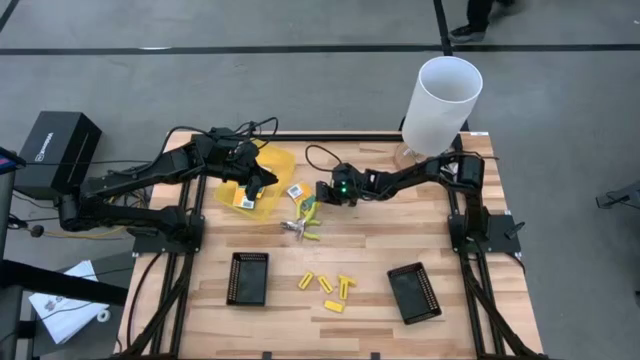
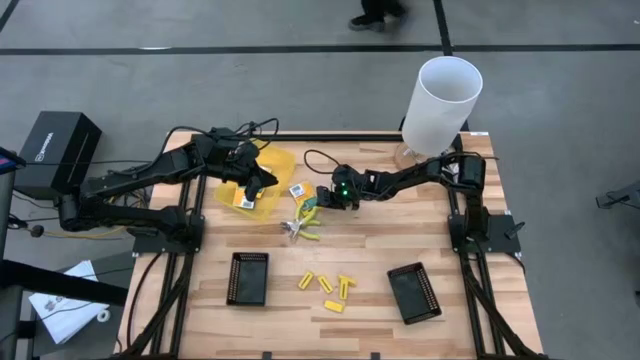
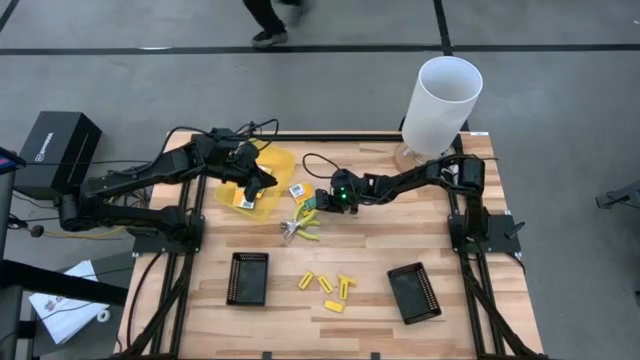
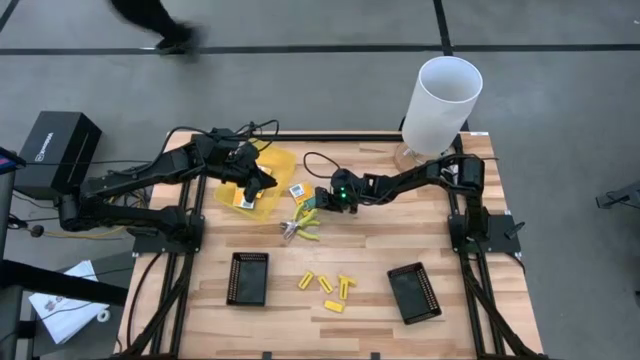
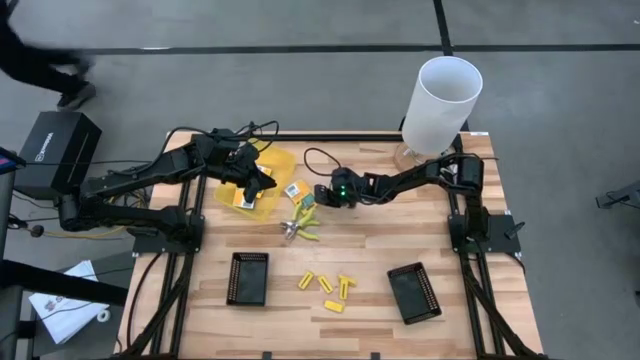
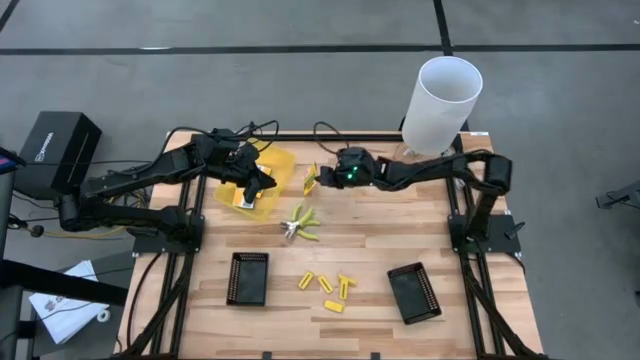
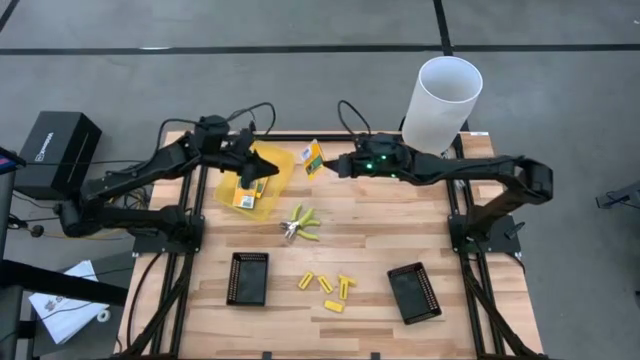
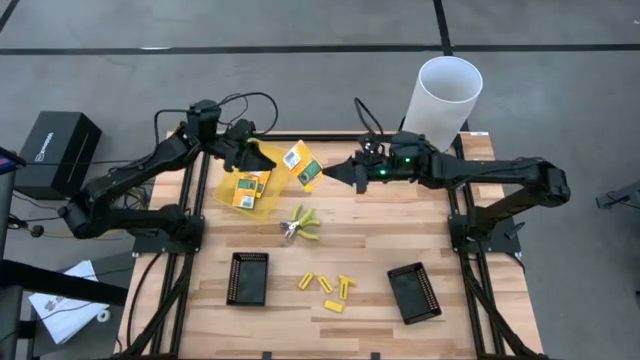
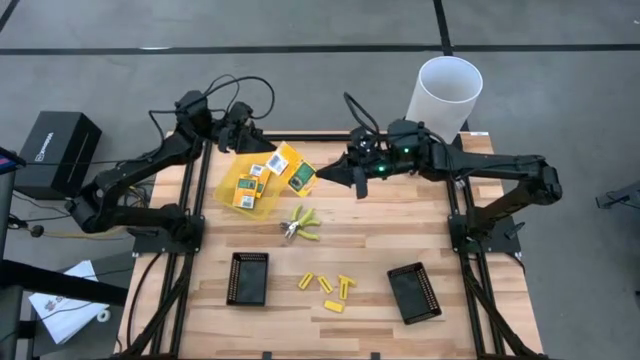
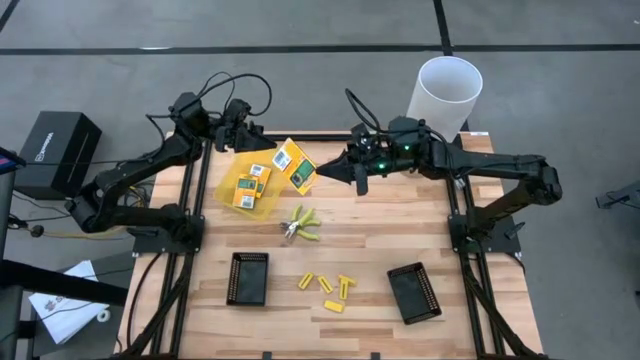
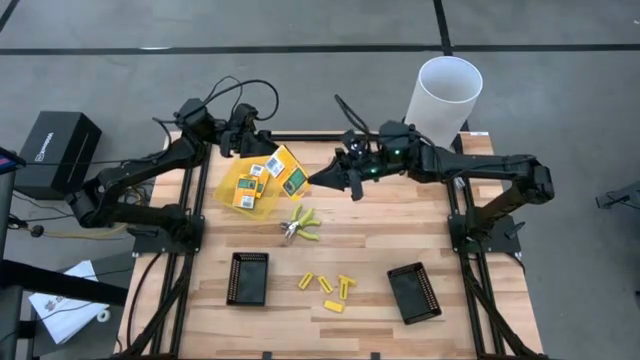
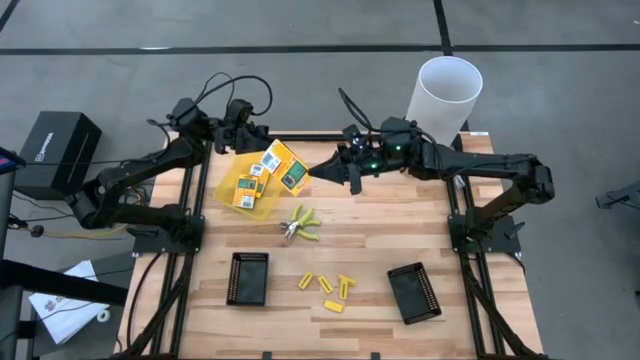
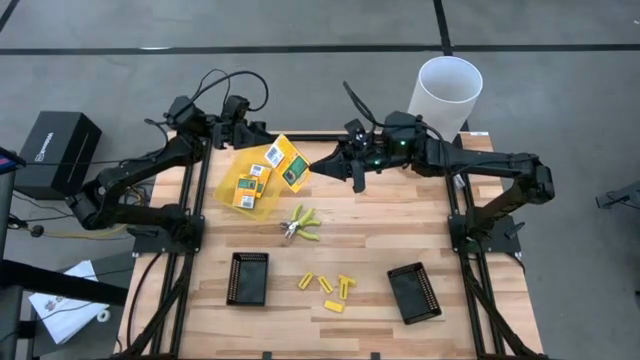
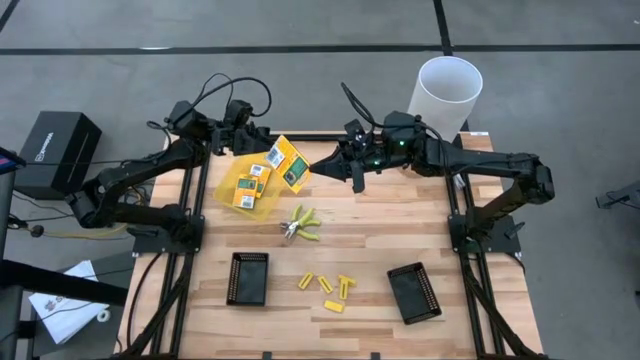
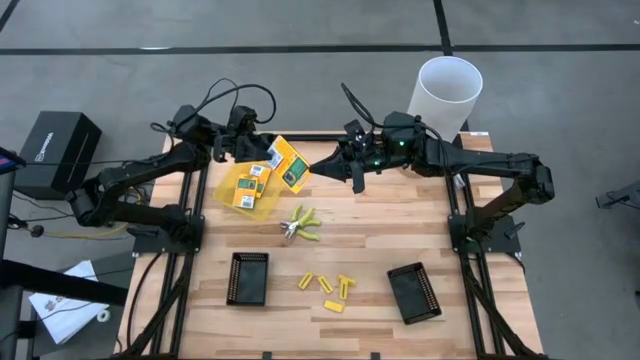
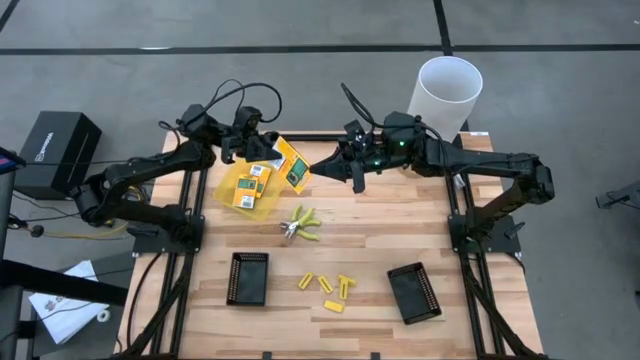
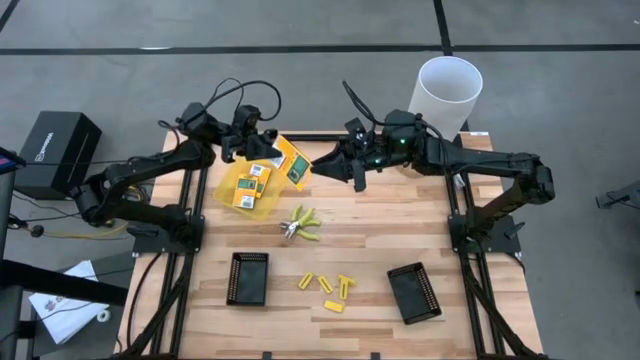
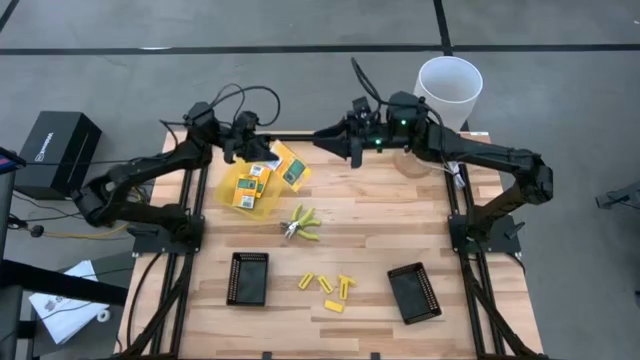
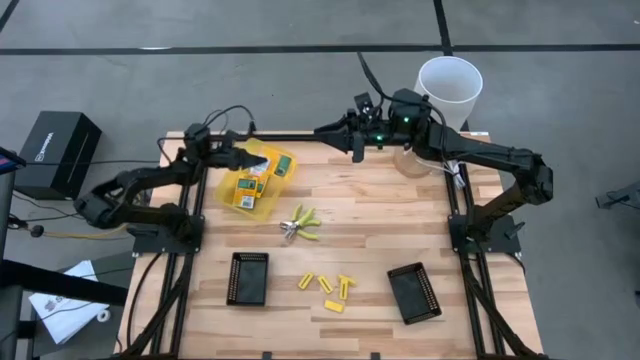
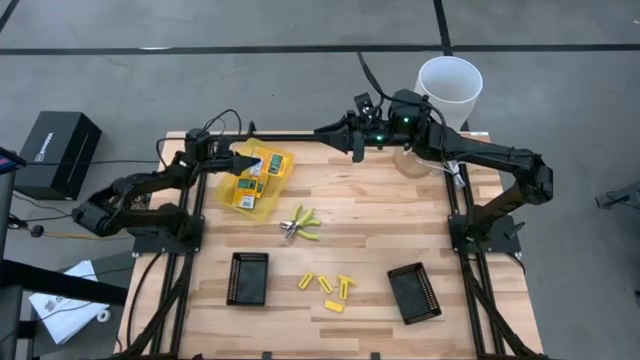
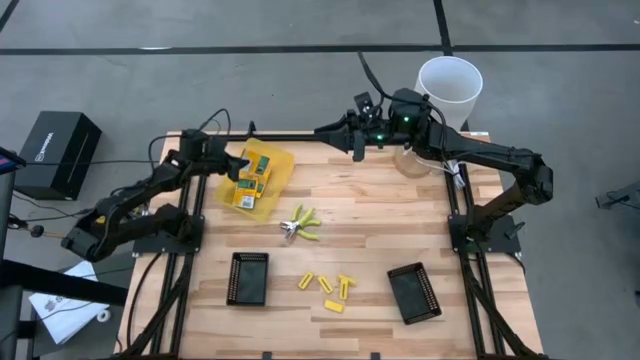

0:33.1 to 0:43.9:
Task: Pick & Place School Supplies
Put the yellow crayon box into the yellow bin

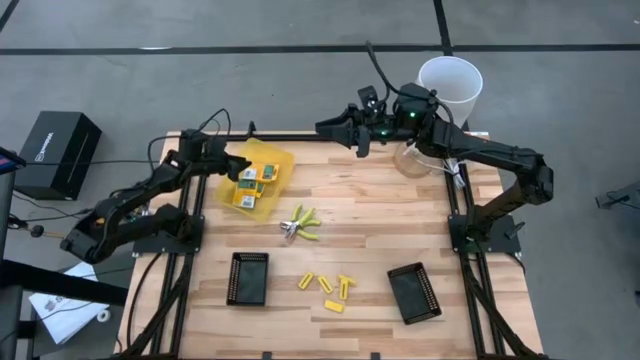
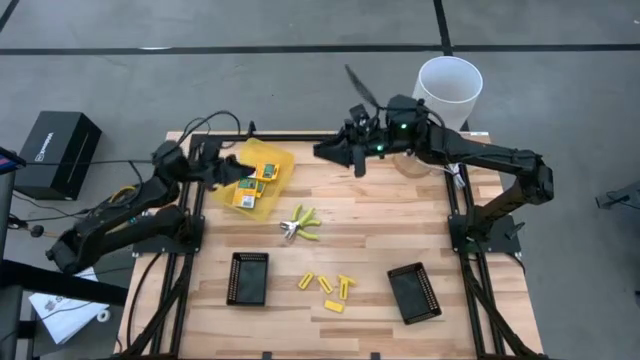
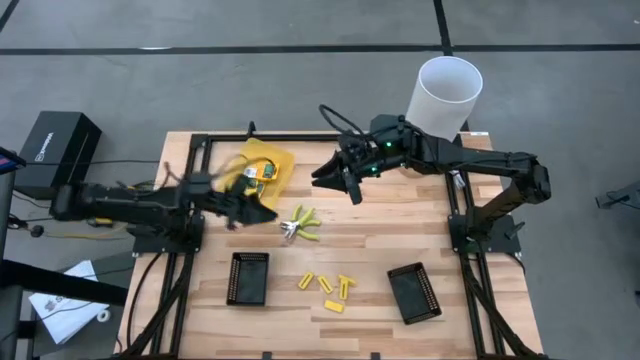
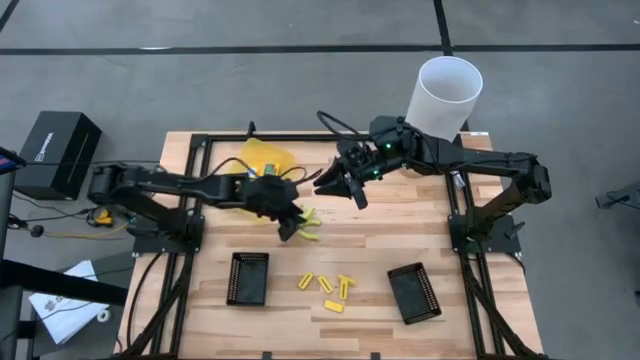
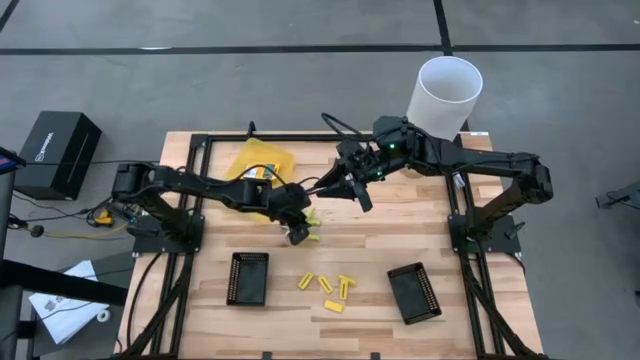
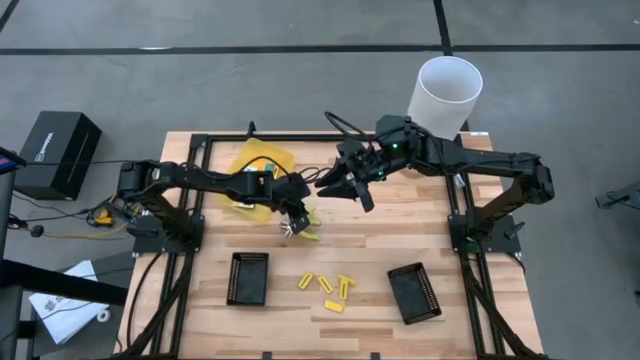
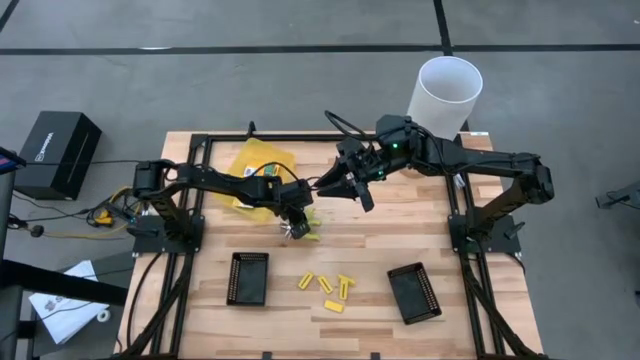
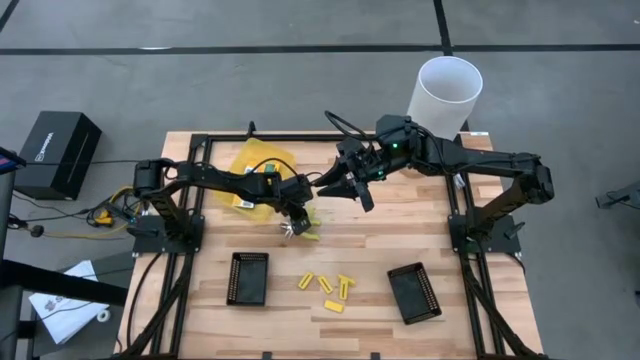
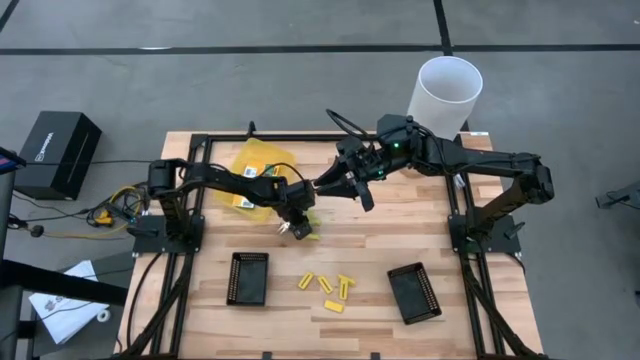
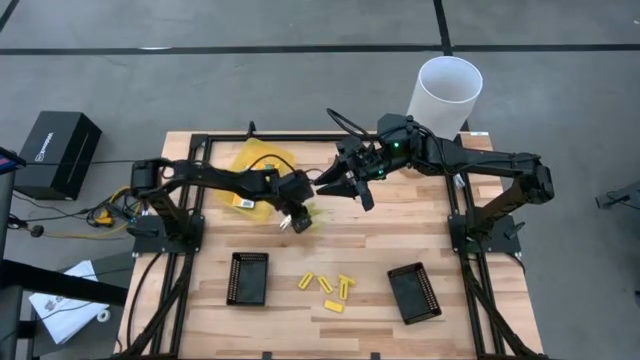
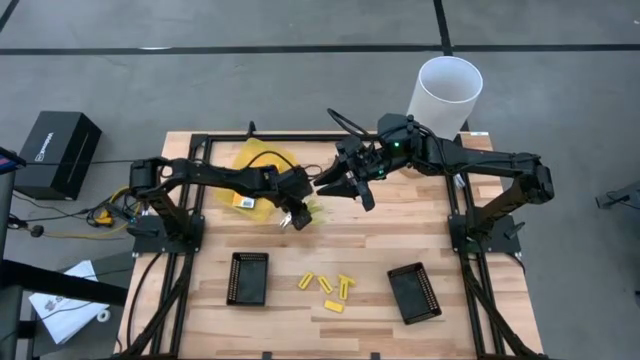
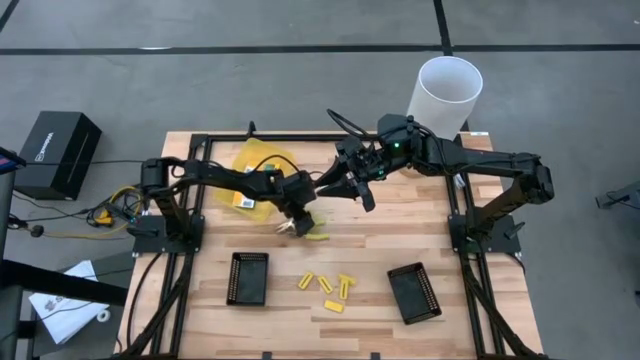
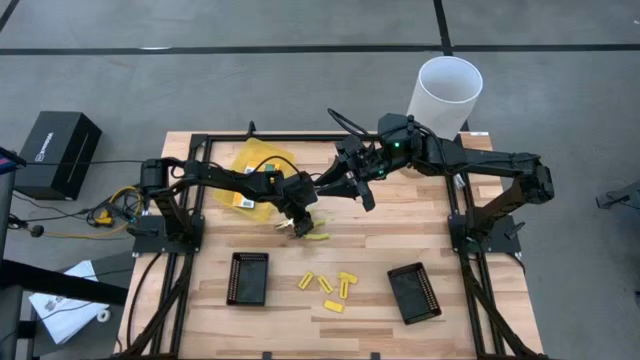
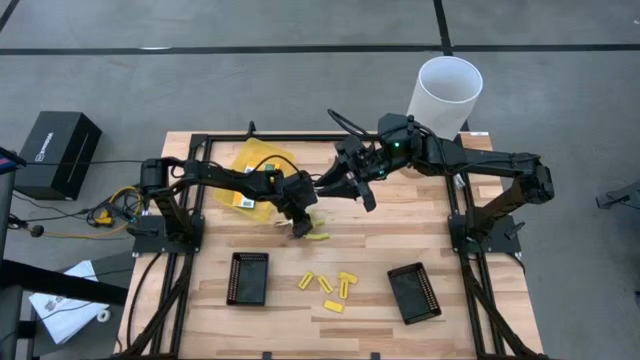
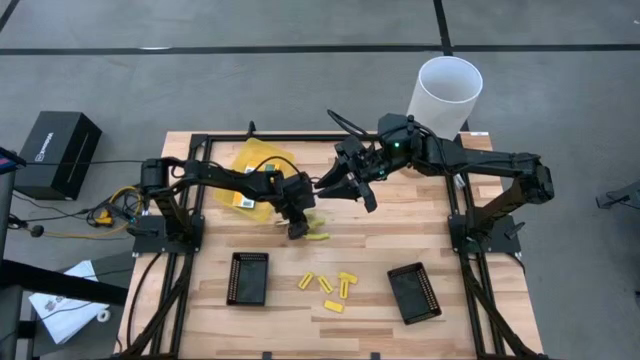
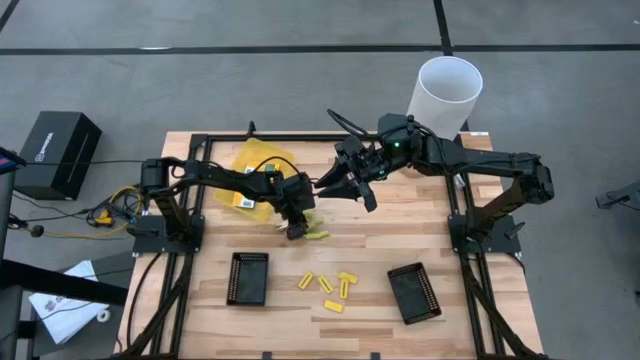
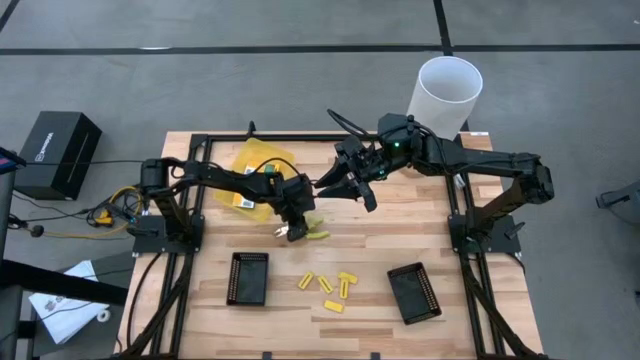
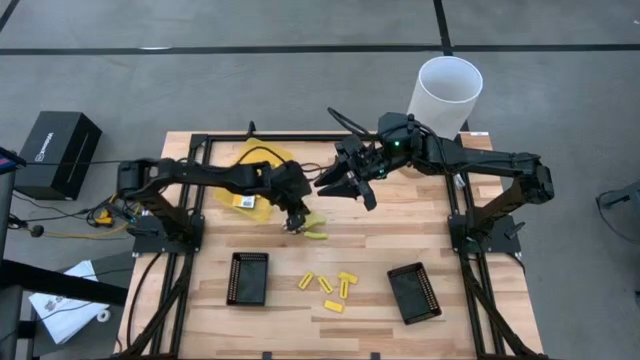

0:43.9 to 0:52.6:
Put the green hole puncher into the left black bin
